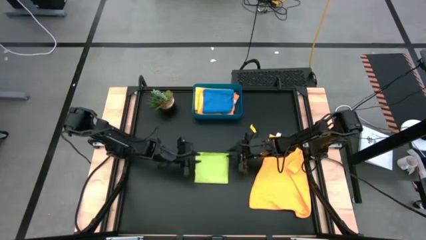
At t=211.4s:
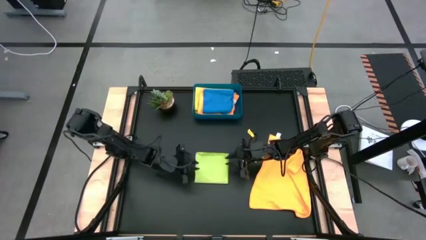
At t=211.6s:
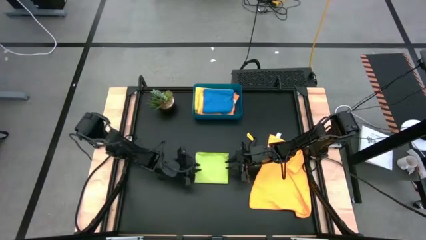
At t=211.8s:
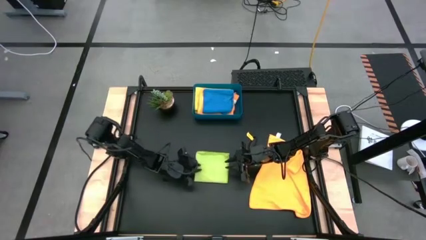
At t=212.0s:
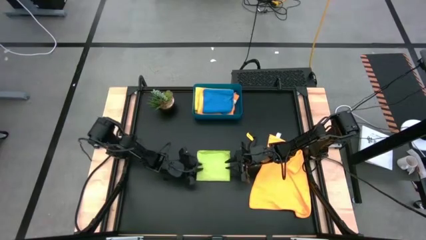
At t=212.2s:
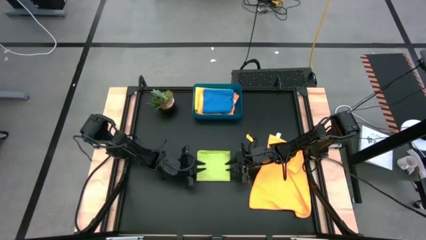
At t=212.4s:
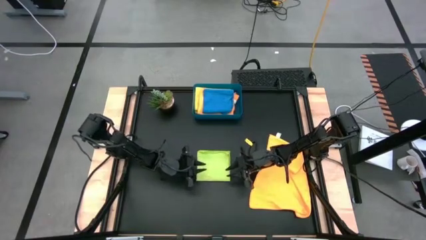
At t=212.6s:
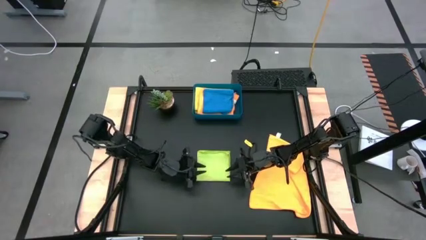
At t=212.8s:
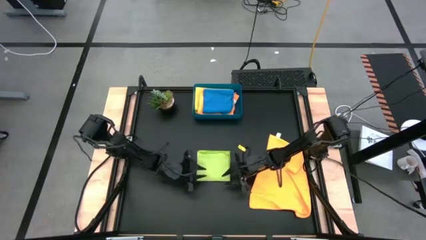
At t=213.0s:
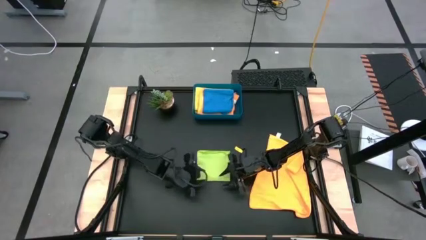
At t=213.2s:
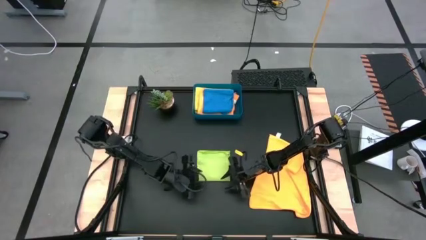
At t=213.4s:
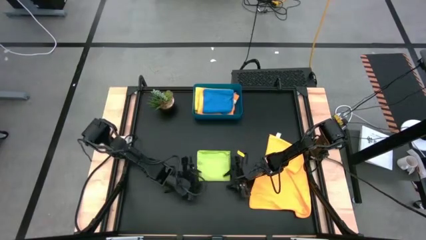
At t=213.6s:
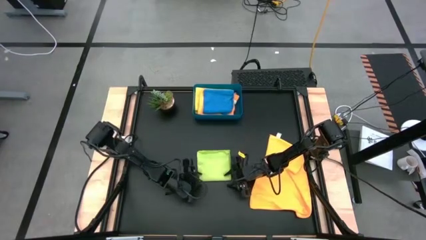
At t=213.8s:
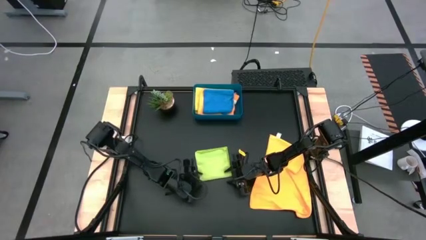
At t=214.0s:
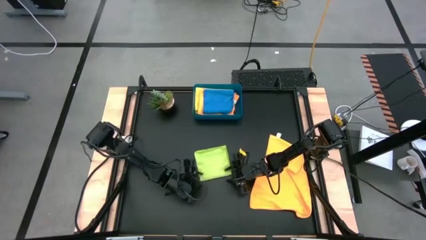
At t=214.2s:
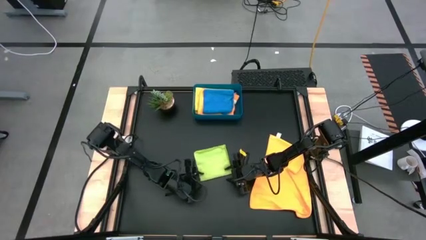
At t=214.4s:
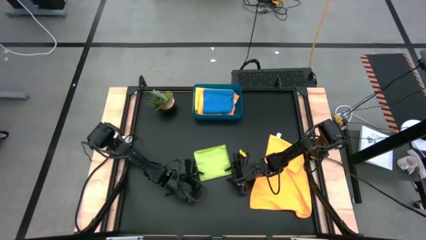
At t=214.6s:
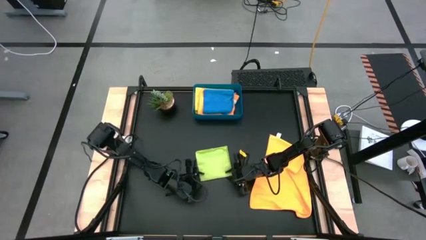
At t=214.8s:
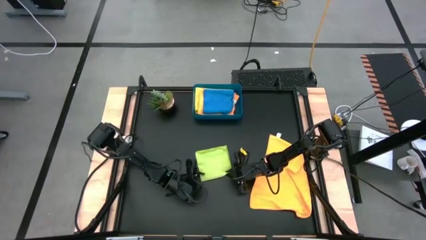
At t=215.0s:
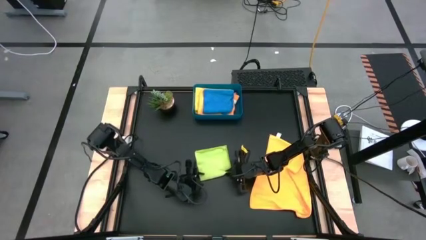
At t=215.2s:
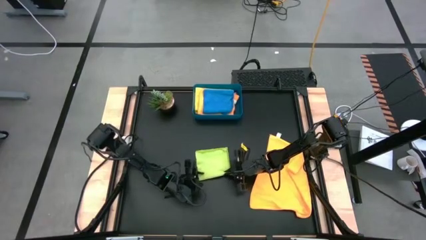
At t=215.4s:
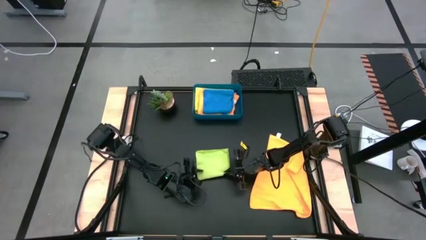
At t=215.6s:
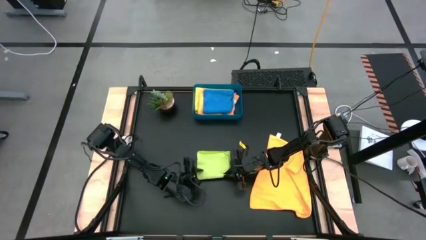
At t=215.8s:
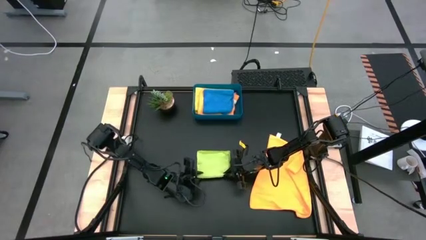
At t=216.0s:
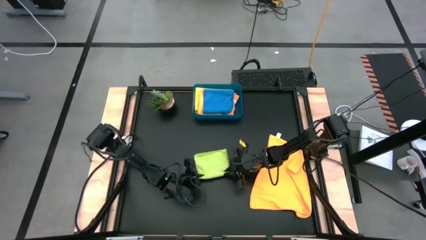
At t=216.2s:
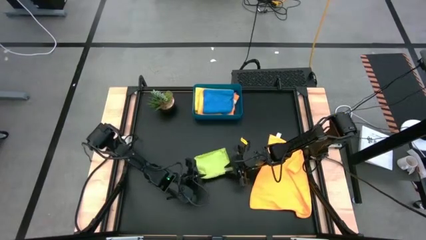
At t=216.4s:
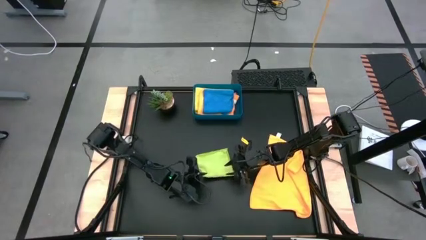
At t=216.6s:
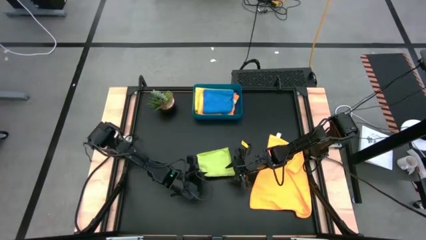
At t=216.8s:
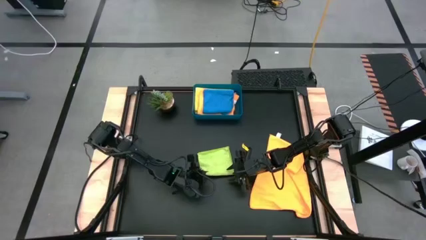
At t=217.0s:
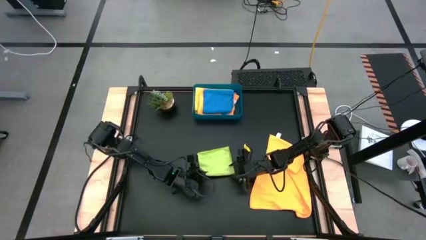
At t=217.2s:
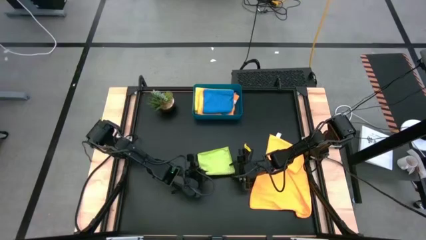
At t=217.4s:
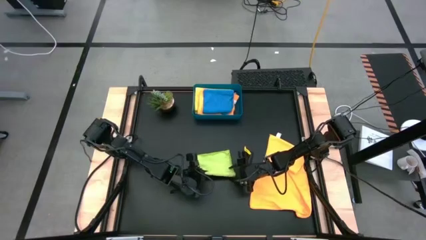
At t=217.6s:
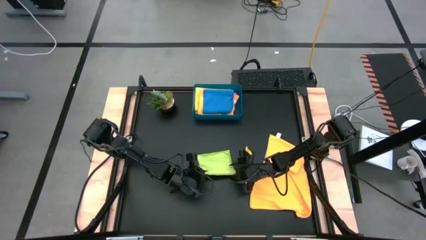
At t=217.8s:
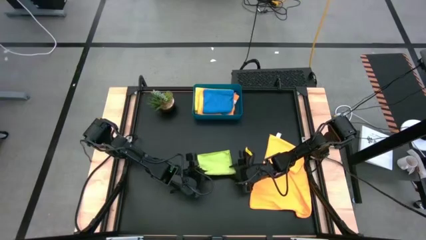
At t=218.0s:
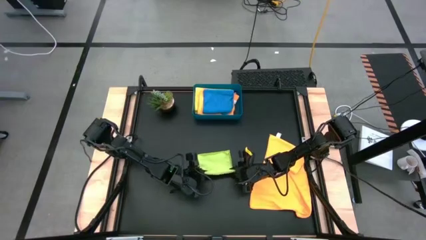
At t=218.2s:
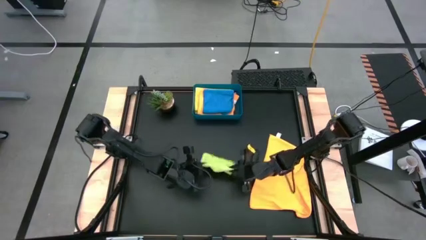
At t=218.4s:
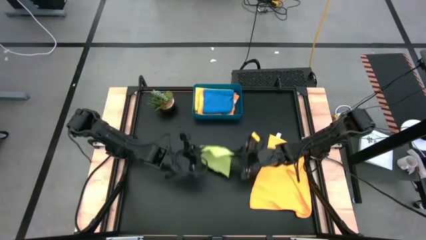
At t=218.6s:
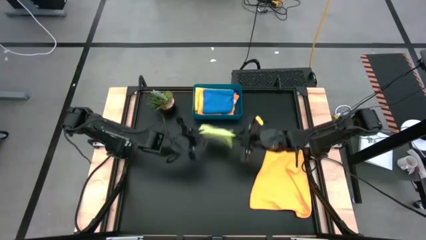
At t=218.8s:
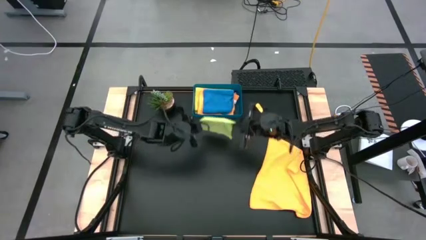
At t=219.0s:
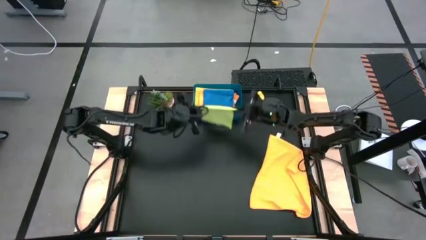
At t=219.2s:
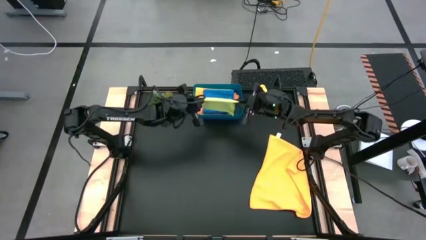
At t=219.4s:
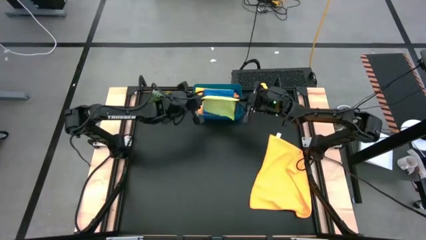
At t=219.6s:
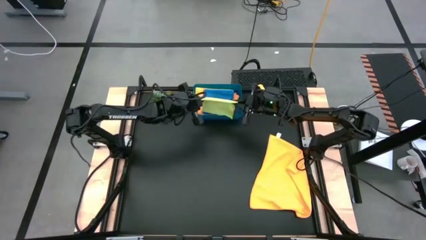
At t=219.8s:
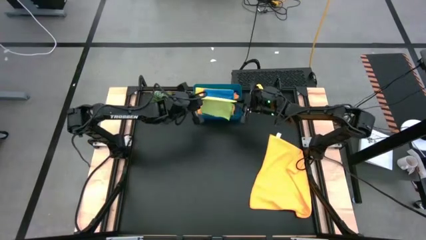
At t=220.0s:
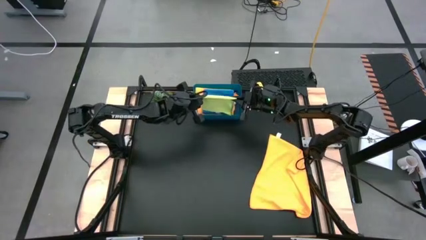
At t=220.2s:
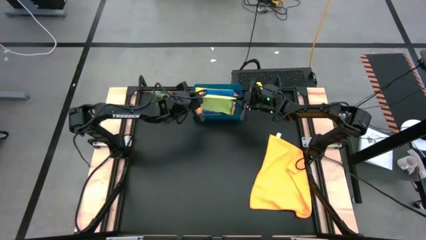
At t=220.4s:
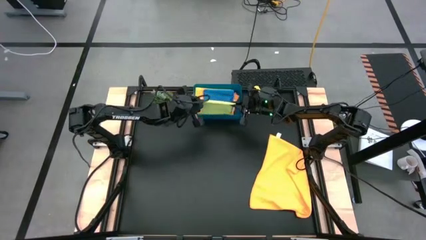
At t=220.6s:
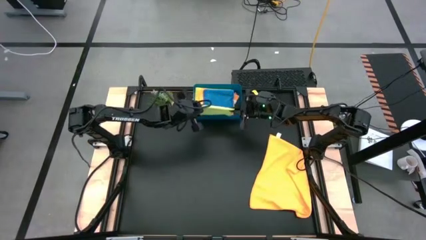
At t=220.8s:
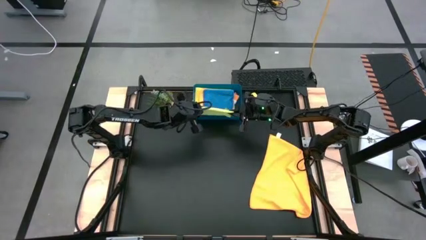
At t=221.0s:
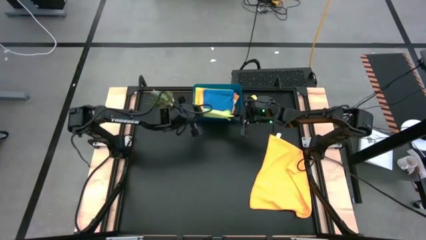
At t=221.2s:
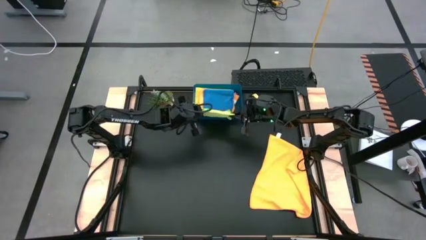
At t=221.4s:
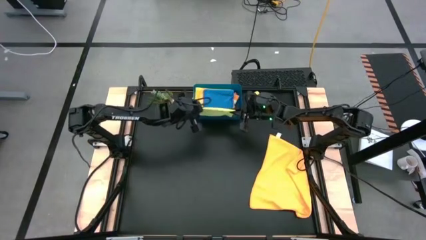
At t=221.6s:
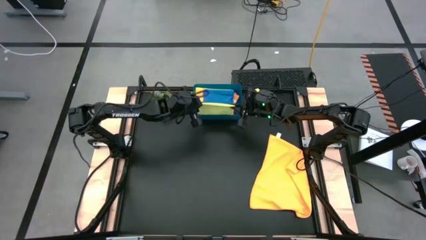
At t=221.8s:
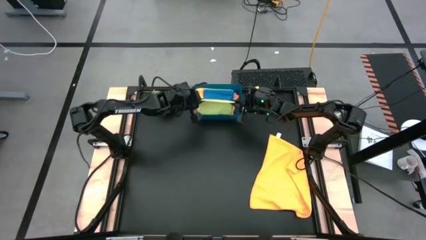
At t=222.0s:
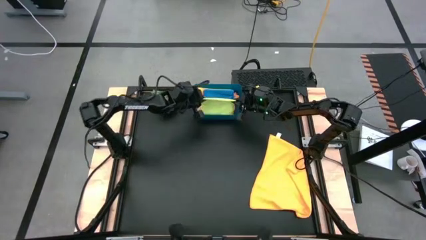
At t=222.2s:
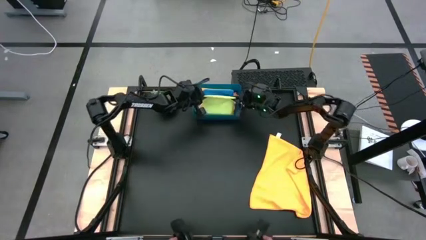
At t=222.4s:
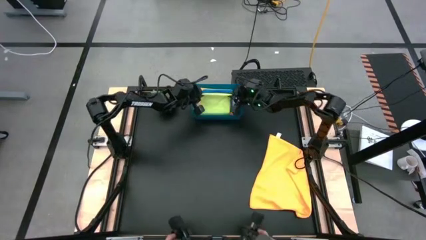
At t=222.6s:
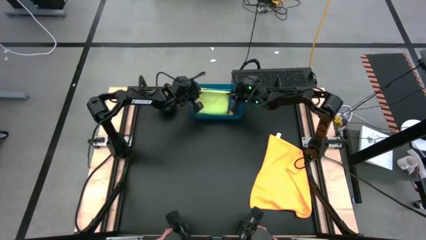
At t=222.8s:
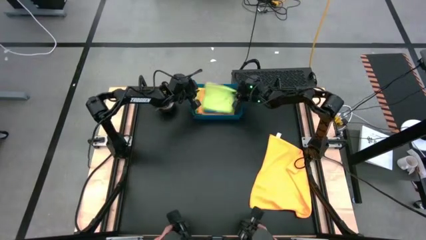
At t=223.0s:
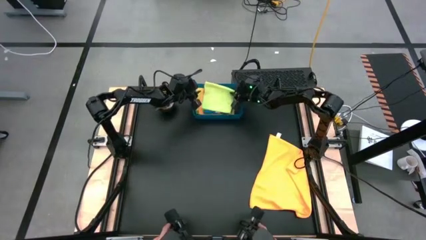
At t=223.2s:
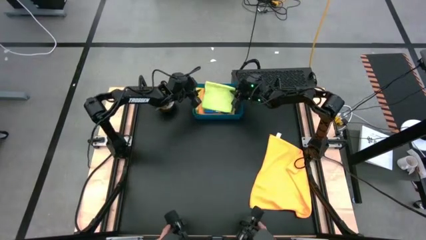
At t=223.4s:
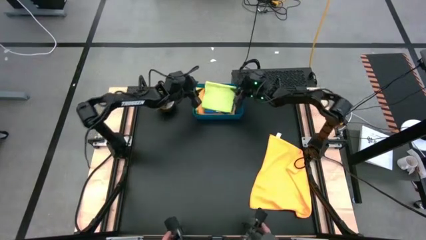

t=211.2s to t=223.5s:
Task: Fold microfiber towels
Put the folded green microfiber cloth into the blue bin

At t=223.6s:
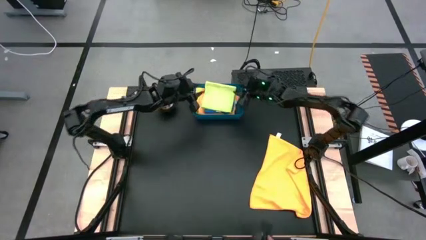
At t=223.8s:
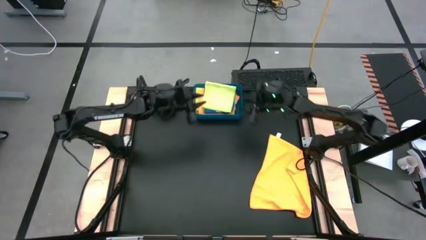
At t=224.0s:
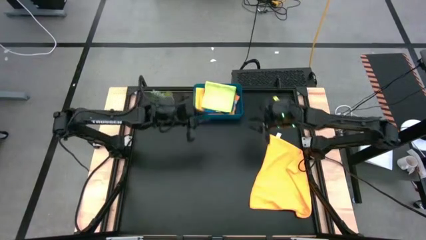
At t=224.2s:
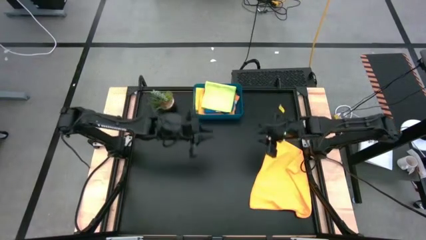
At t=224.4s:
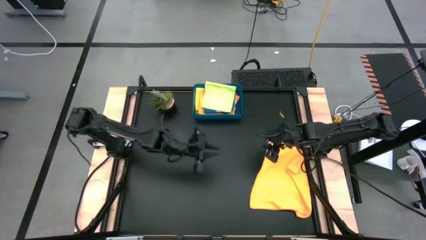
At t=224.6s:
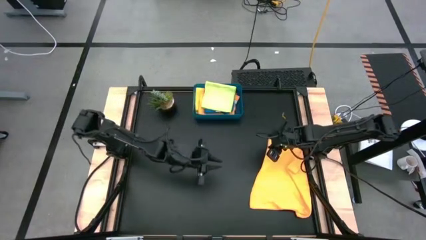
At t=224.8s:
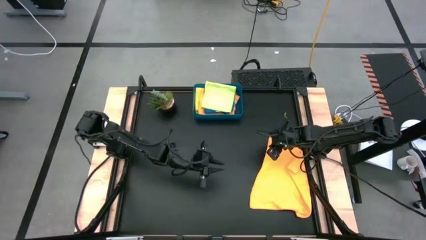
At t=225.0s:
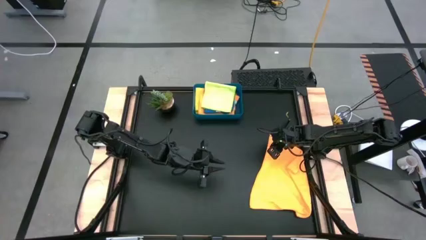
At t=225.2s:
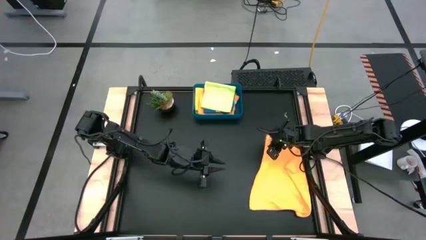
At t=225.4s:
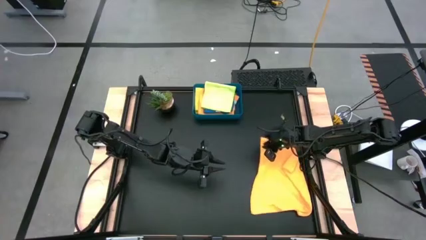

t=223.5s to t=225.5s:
Fold the orange microfiber cloth

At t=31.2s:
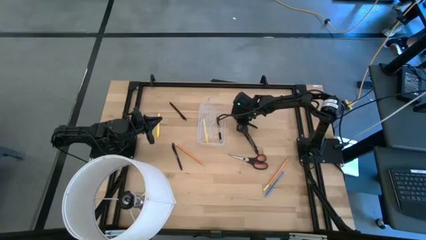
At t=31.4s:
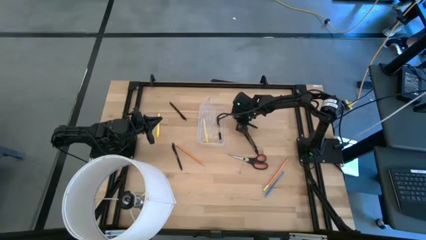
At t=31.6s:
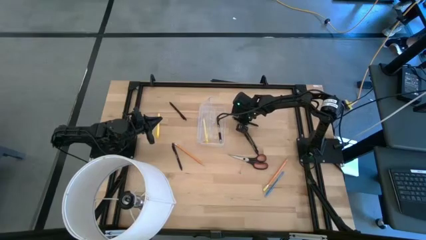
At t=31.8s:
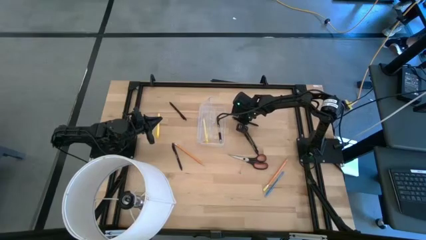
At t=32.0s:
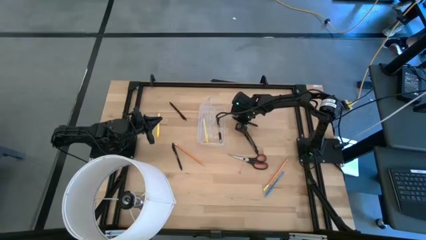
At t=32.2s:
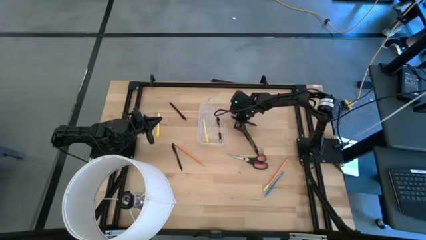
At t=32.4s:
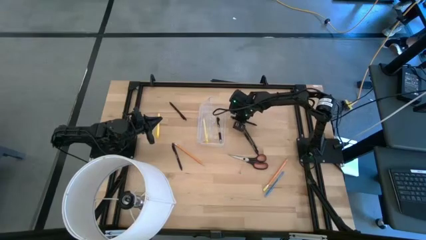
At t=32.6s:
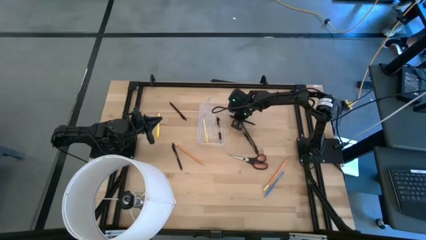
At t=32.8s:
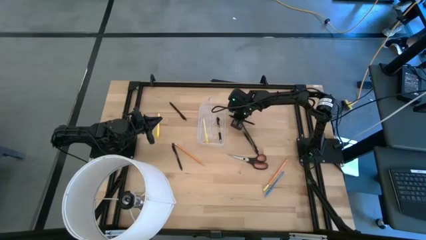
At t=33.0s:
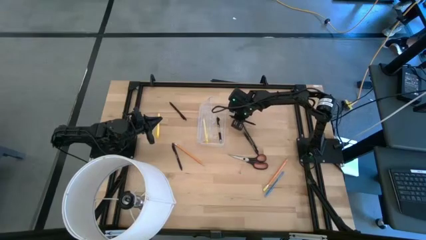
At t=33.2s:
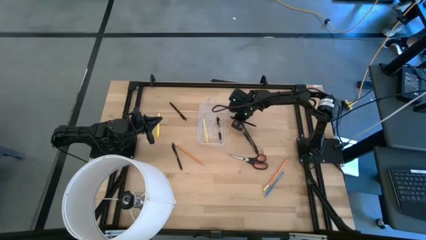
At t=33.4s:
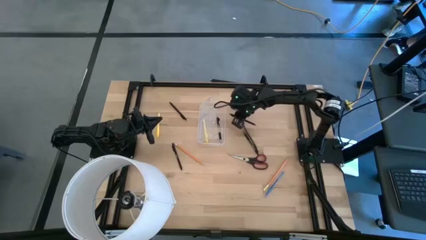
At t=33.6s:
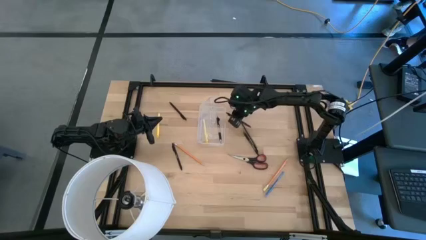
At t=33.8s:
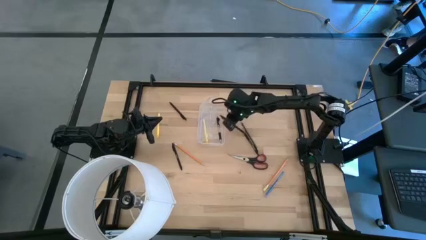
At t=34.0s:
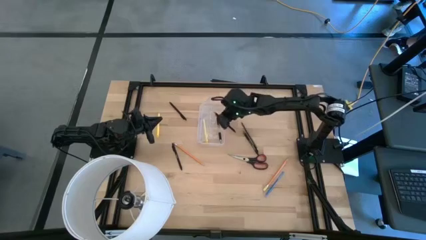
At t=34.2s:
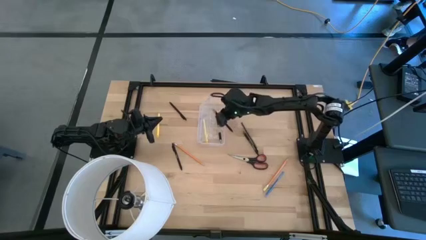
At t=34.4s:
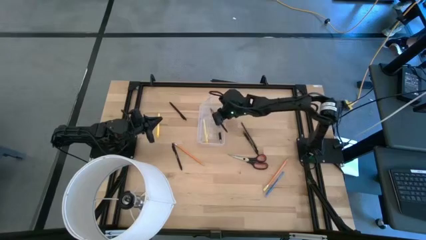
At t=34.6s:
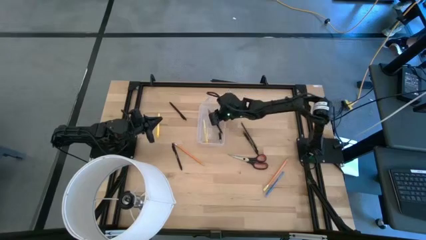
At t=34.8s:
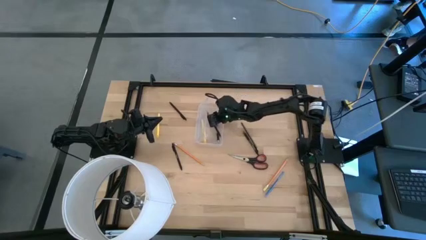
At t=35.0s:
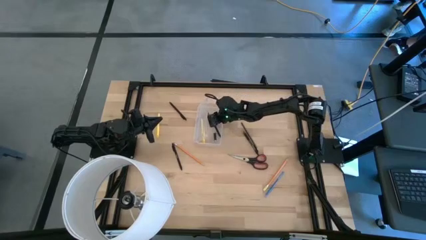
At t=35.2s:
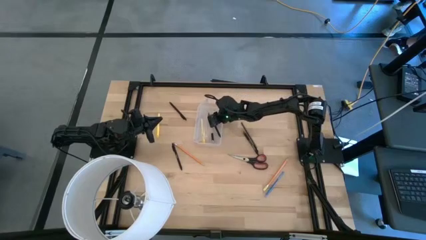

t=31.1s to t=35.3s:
Task: Pick & place school supplies into a supply box
Put the top right black pen into the transparent supply box
